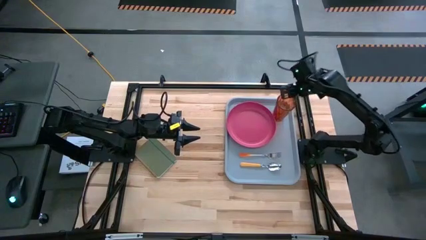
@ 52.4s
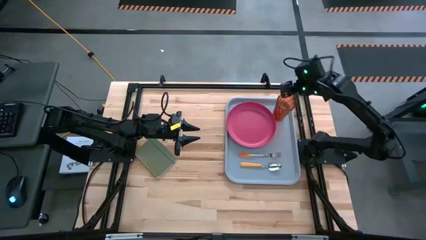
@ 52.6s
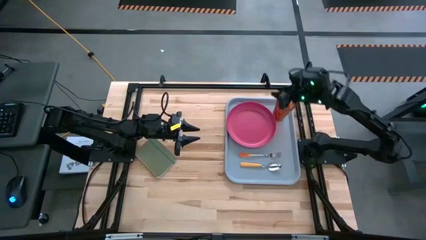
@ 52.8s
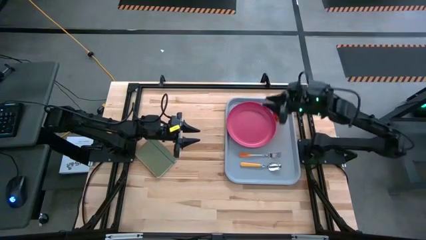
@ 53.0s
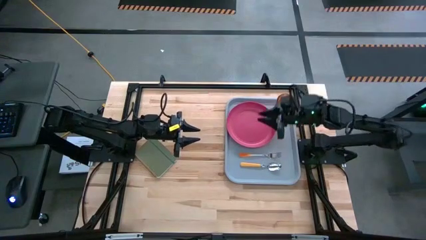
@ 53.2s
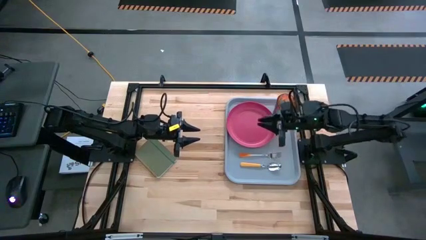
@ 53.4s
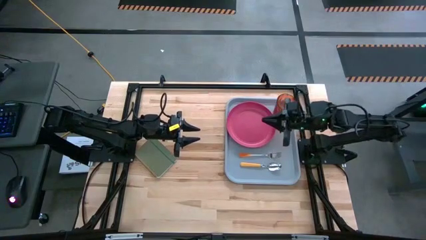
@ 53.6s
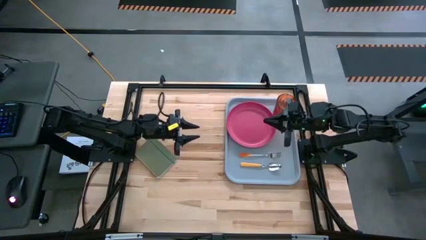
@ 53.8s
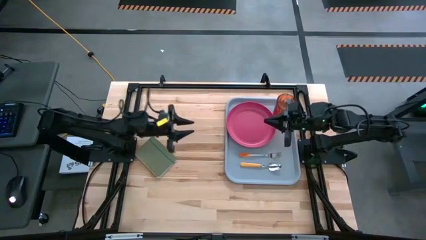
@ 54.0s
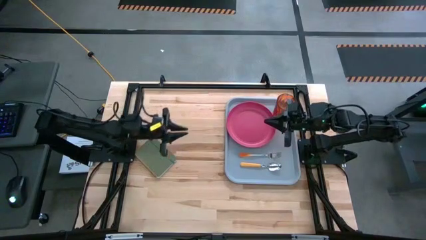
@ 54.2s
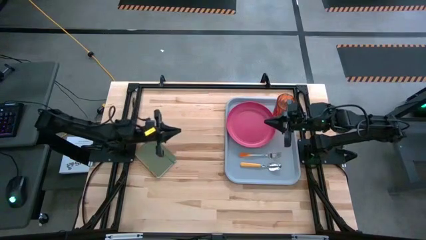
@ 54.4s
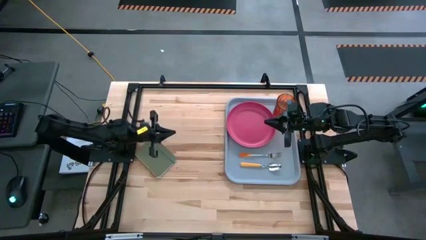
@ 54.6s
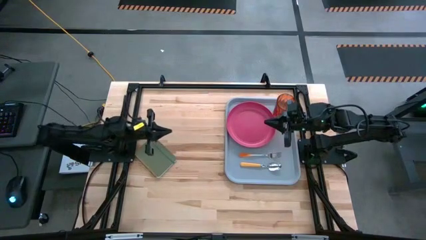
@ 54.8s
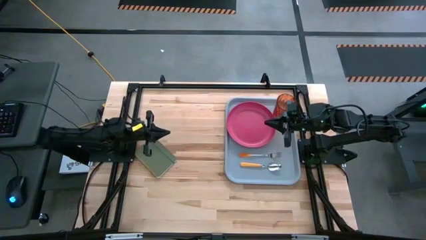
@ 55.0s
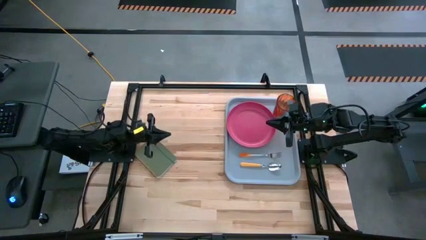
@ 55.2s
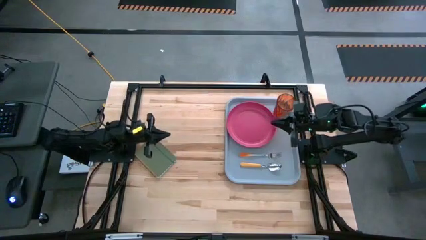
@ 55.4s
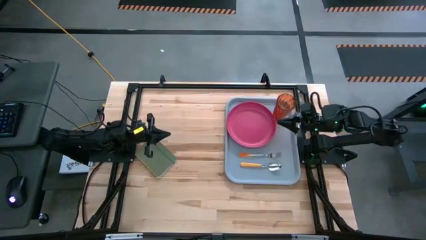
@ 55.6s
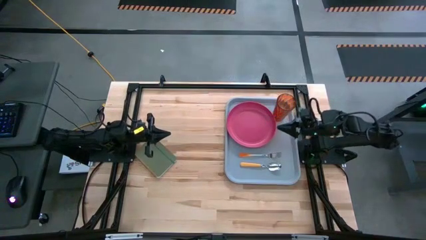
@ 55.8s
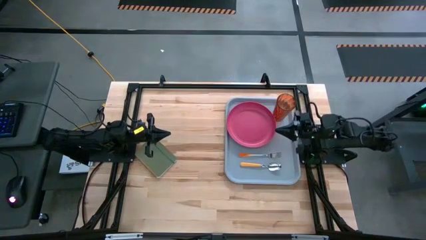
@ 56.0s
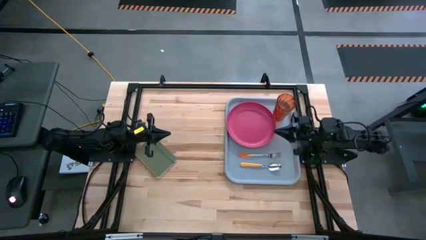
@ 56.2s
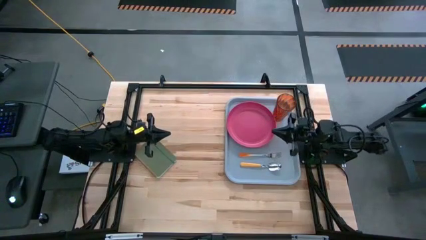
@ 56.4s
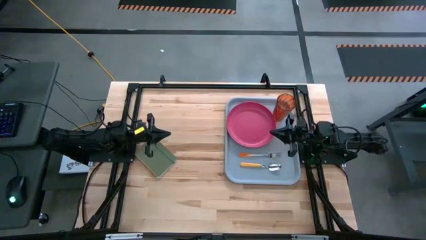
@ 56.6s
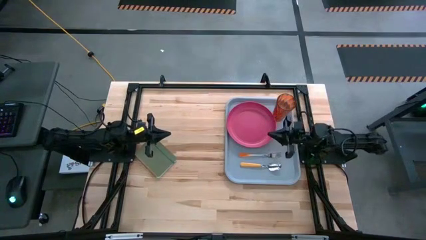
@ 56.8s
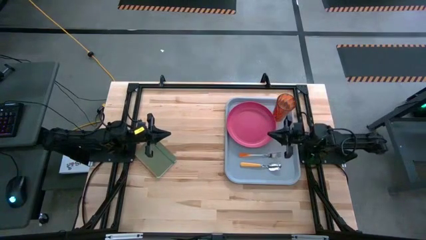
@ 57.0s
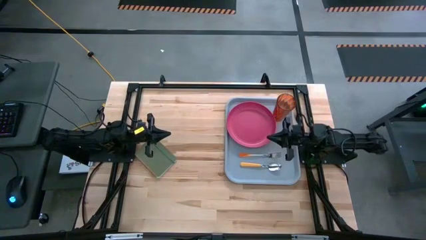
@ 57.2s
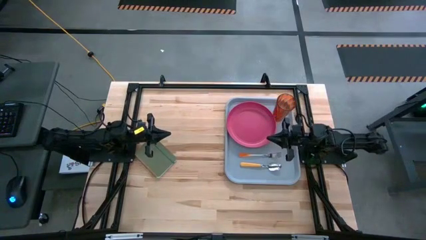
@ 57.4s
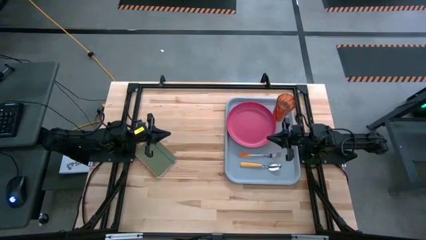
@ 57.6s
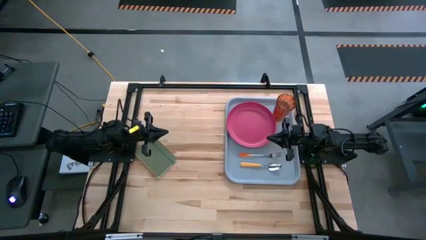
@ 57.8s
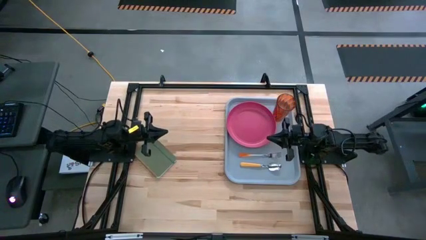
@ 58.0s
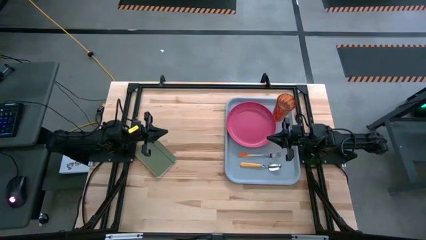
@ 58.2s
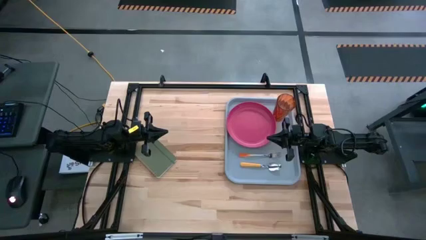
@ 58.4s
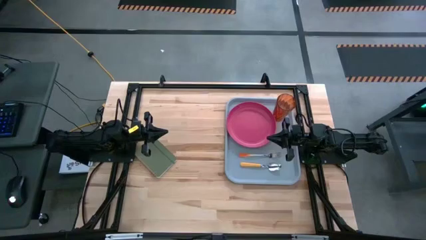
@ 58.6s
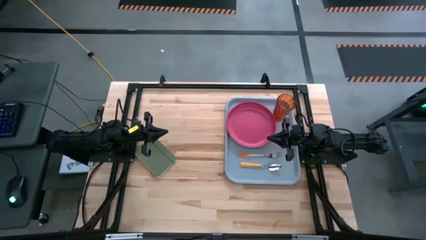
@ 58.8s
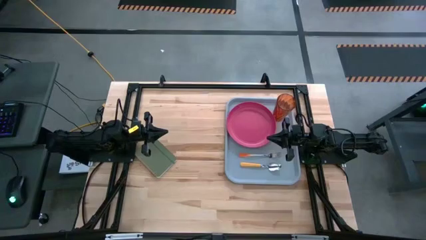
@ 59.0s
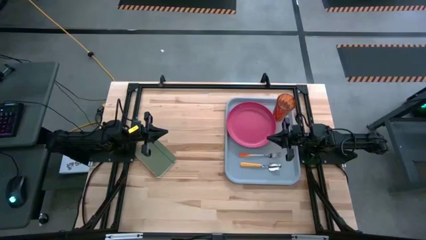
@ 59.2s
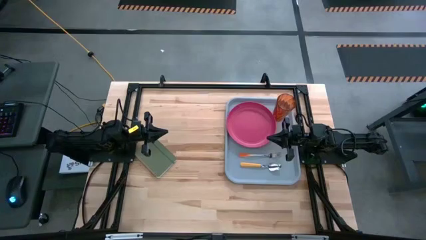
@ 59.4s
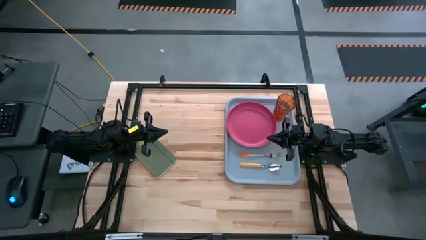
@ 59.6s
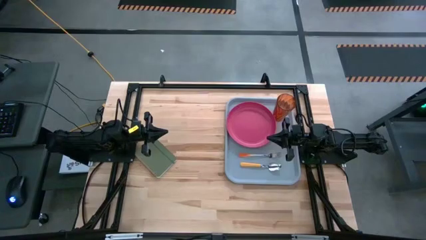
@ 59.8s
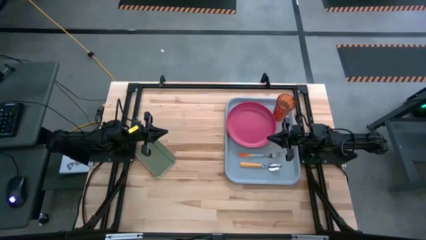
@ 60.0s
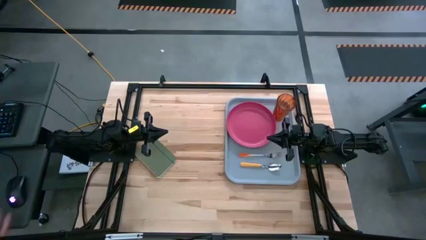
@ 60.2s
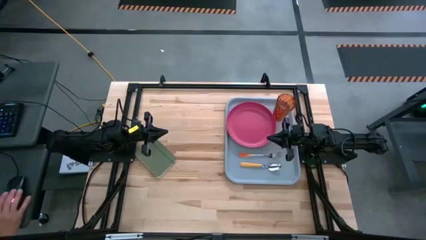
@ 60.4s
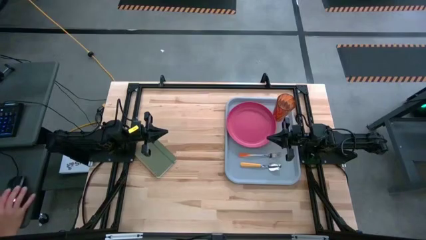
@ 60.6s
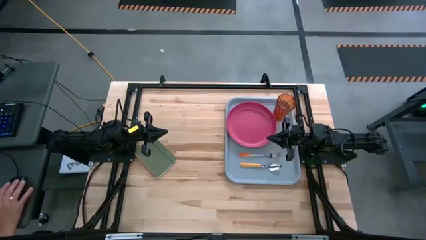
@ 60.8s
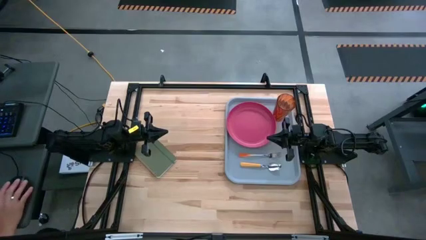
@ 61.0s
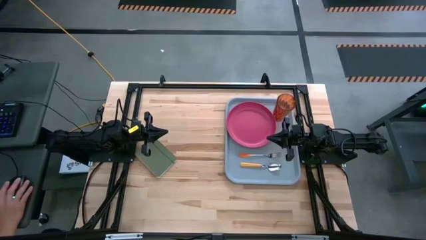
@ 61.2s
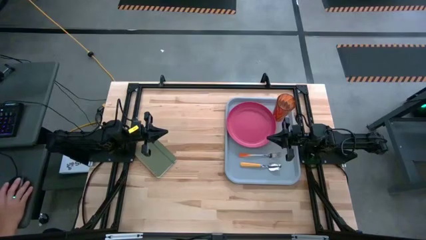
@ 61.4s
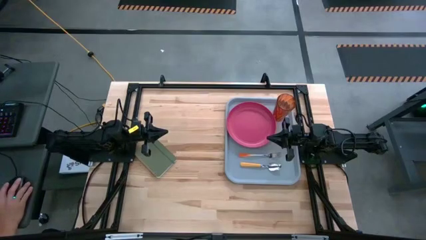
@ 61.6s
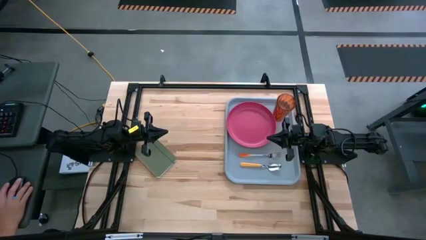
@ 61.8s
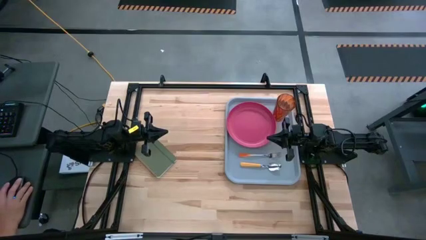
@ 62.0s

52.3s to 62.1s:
Task: Pick and place plate/cup/fork/spoon on tray
Return to Home Position

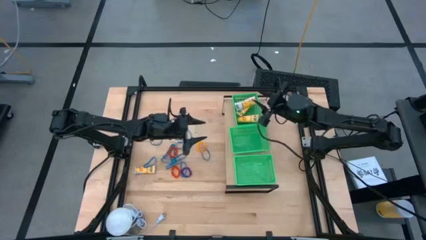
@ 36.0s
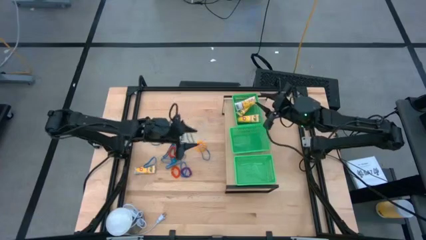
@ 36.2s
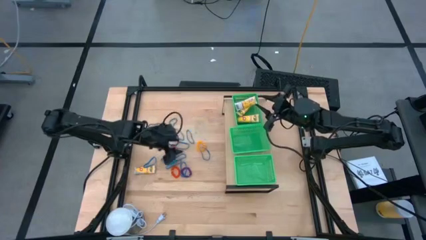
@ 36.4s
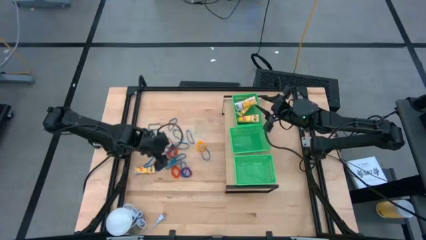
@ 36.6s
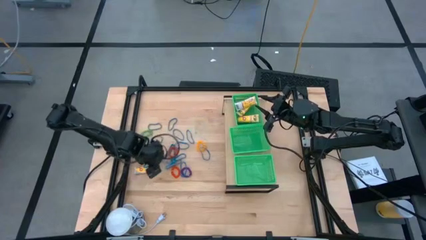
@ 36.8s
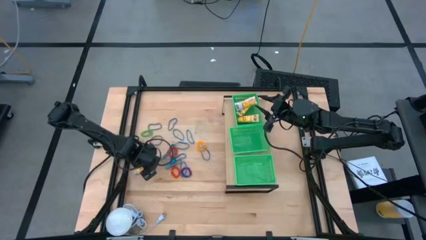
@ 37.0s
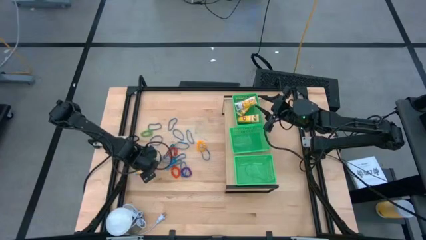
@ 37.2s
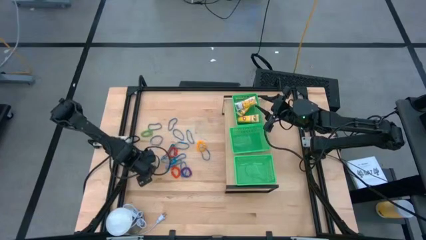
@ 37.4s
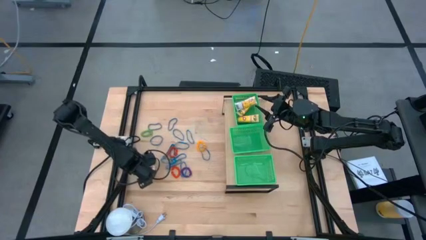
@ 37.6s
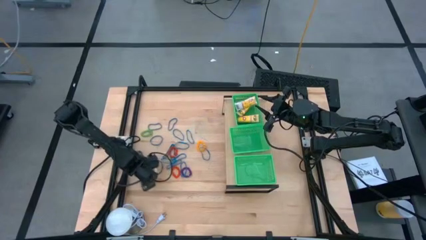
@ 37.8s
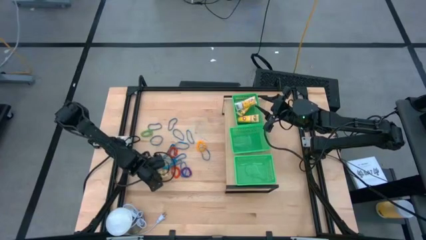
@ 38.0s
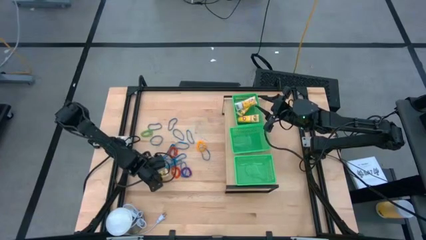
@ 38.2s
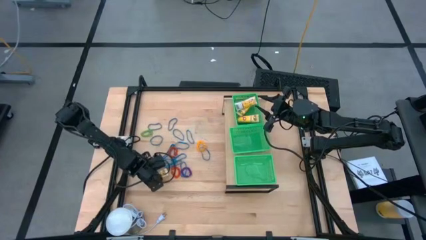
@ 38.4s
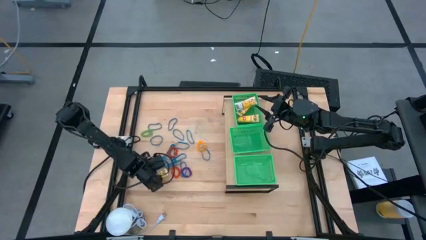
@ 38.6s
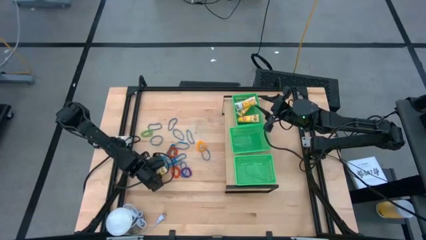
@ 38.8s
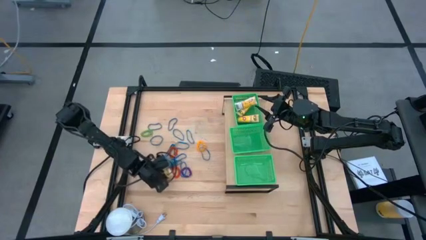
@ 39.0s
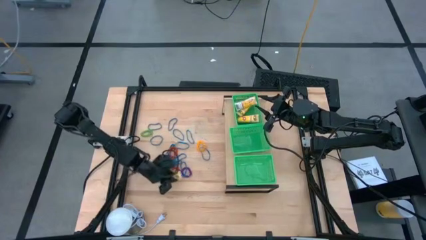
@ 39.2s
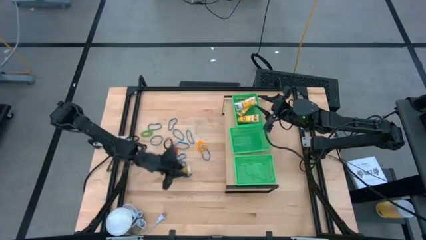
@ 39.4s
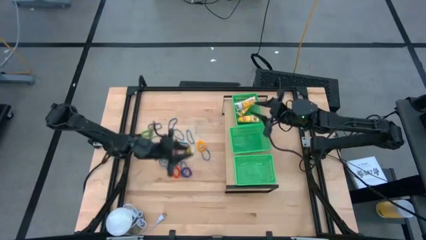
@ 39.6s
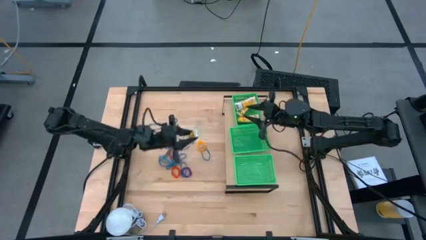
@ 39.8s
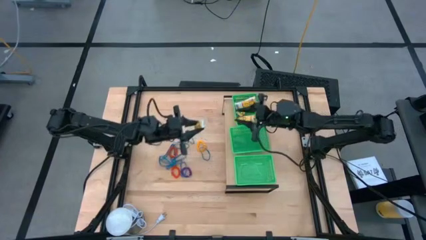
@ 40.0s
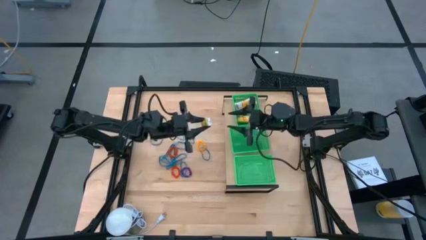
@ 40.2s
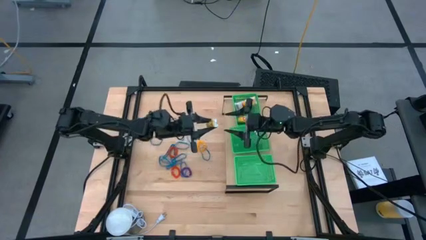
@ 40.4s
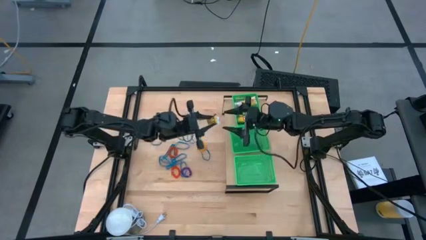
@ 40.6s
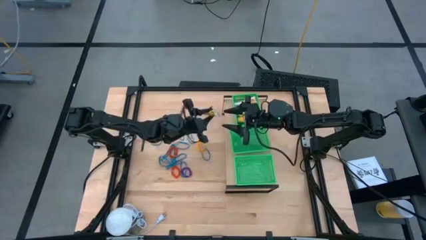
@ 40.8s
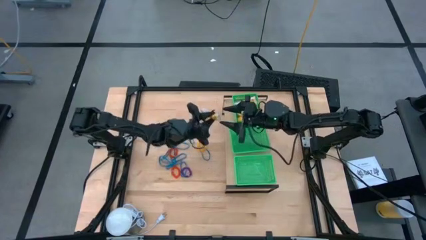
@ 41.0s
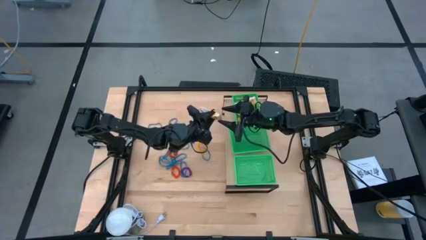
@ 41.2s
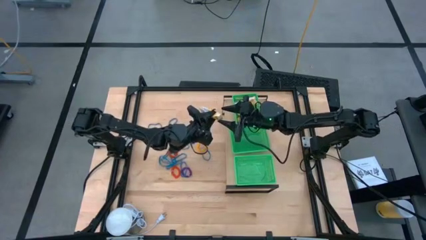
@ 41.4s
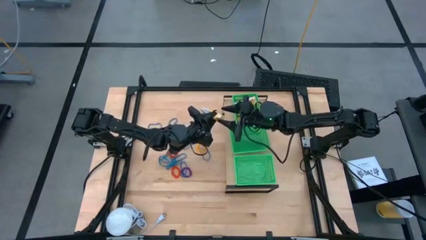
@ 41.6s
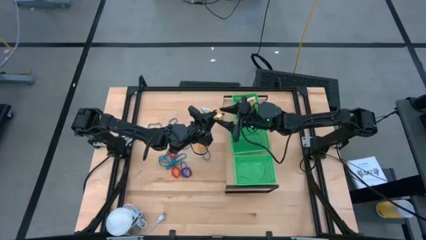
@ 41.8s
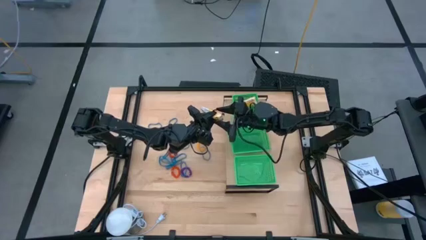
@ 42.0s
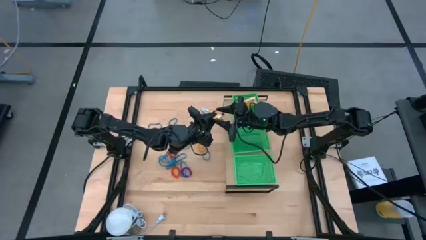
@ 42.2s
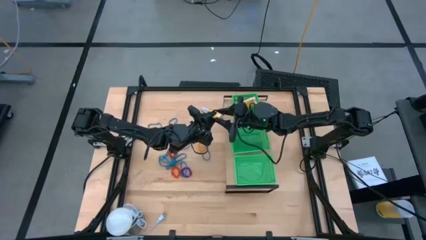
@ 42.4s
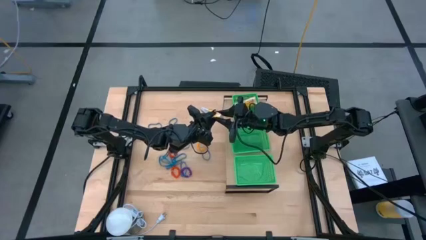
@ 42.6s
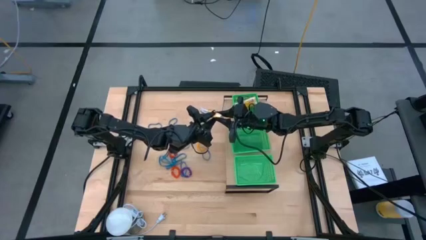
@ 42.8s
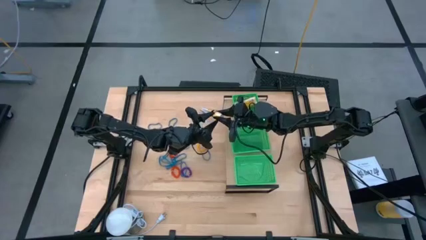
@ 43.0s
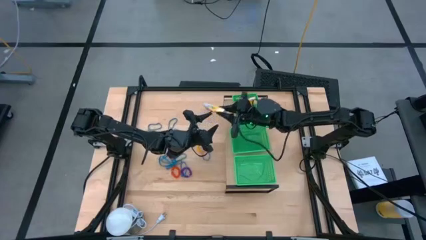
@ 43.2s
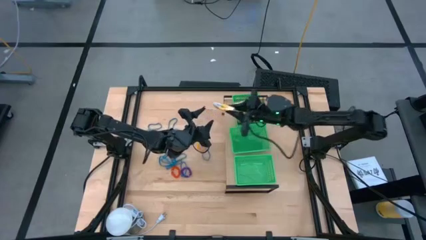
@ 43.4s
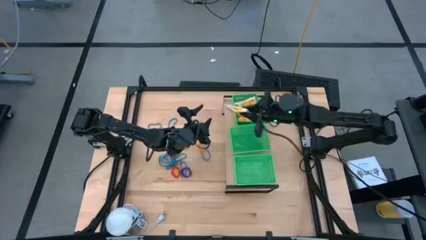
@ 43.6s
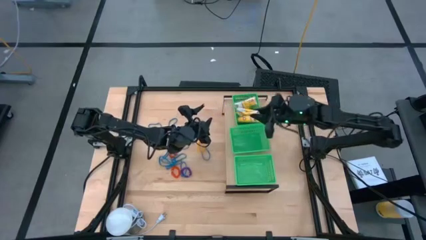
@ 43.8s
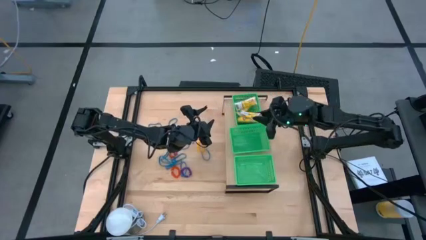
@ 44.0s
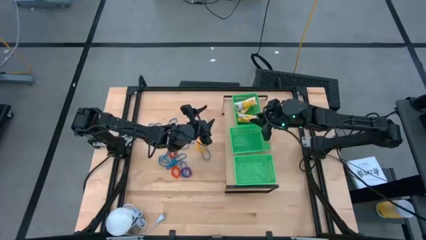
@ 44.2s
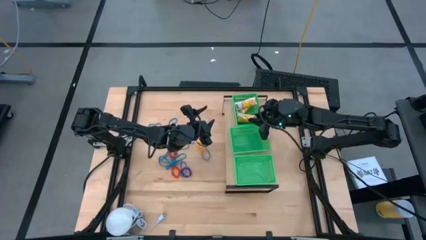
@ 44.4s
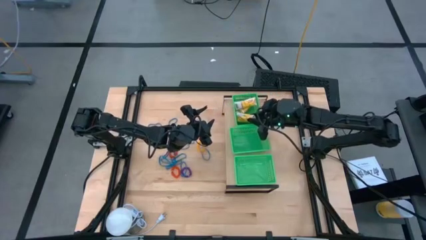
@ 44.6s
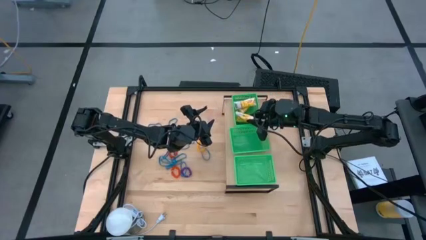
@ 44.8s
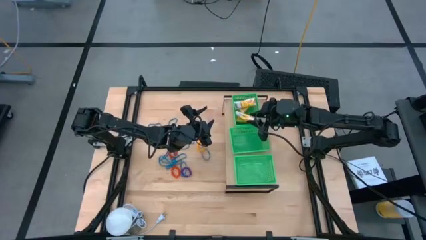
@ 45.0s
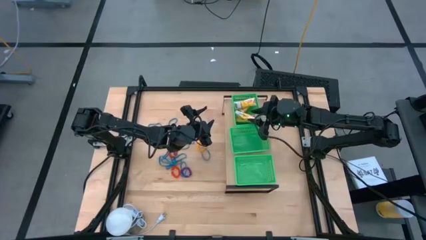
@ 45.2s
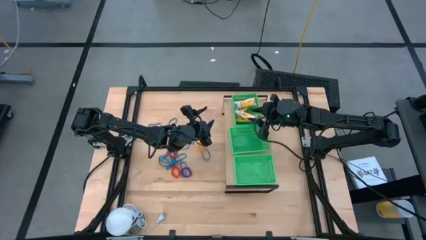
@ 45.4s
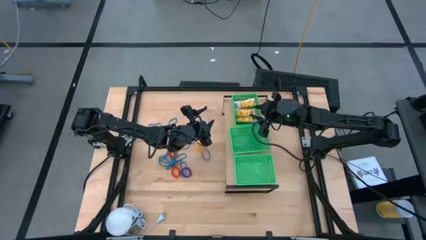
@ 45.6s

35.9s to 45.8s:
Task: Pick & Place Office Desk Supplies
Put the yellow crayon box into the top green bin
